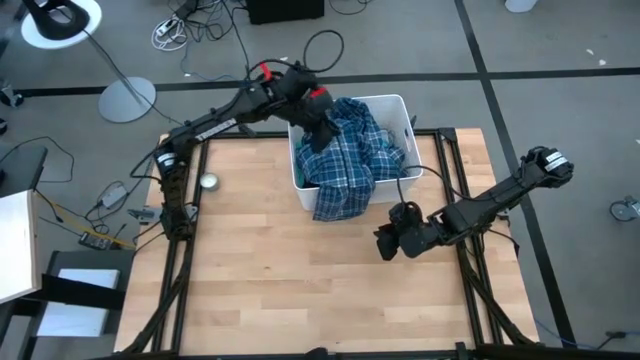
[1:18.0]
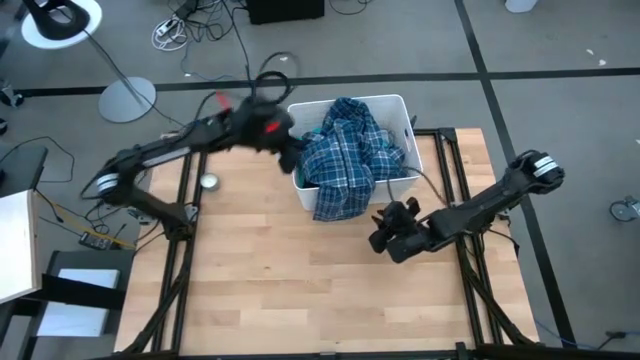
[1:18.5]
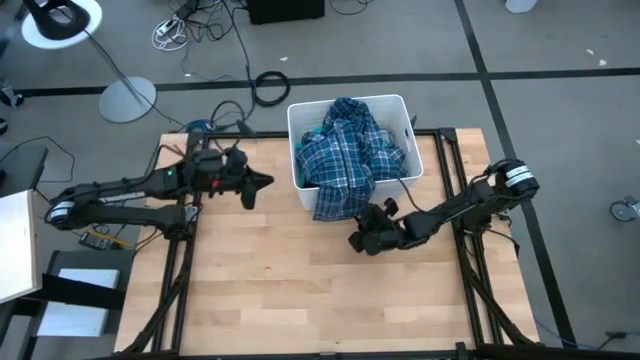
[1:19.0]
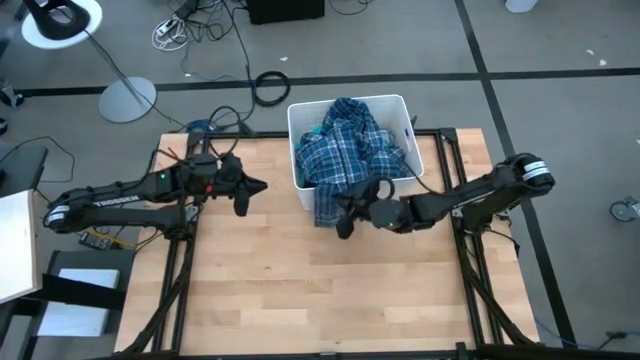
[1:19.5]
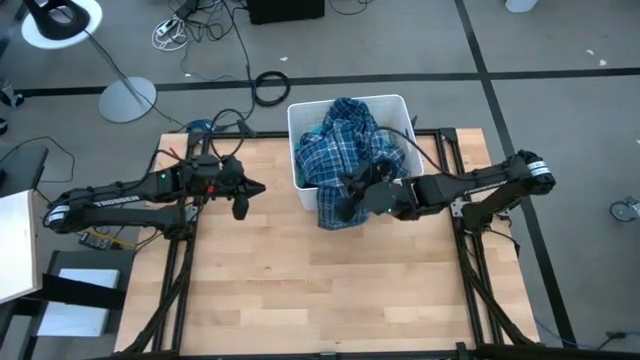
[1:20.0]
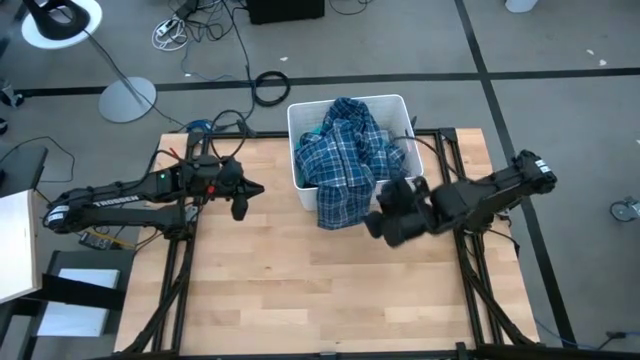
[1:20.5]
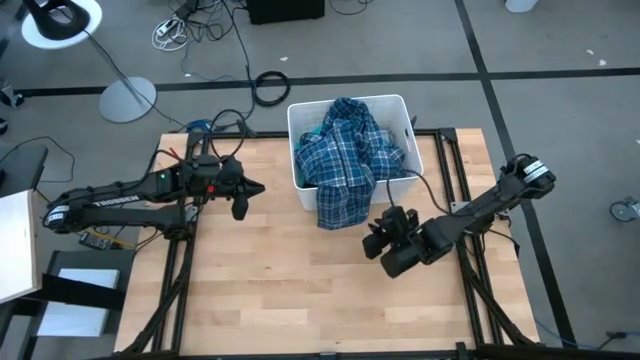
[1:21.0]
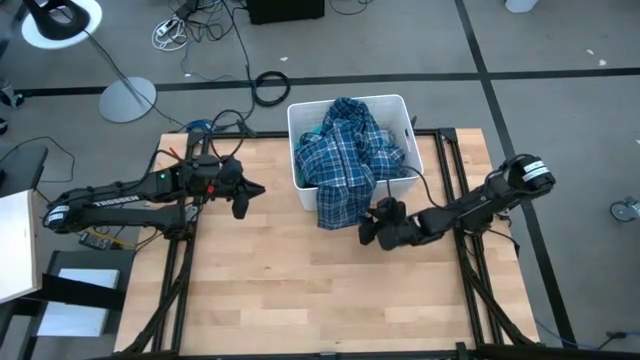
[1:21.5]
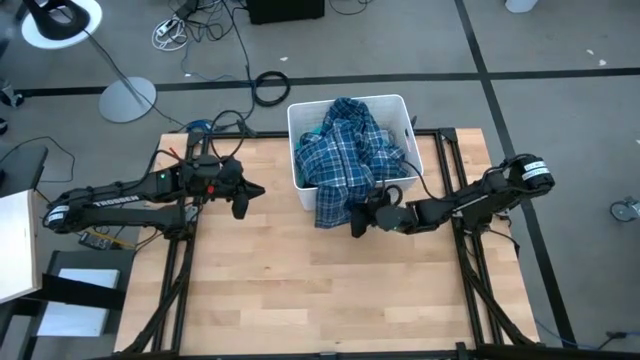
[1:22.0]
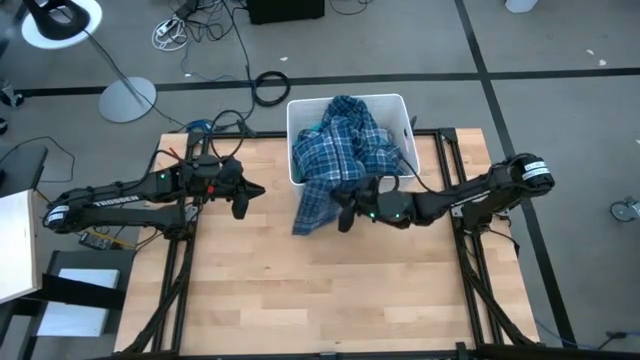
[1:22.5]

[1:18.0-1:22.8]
Task: Sort clothes
Put the dark blue long sleeve into the white bin

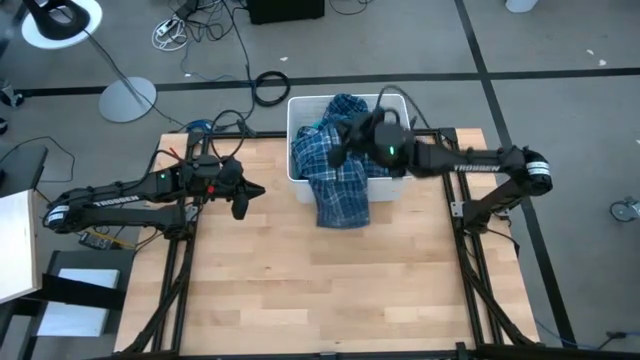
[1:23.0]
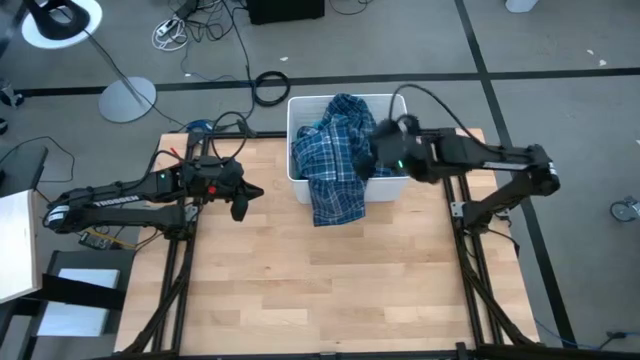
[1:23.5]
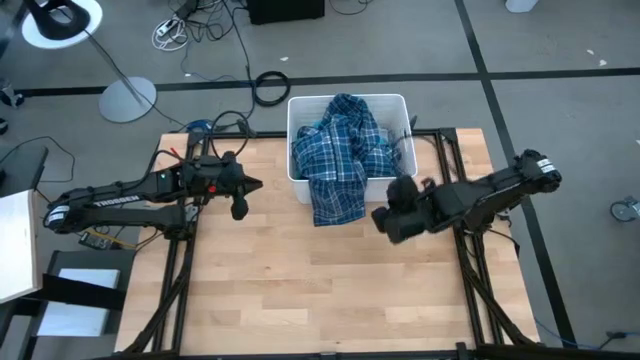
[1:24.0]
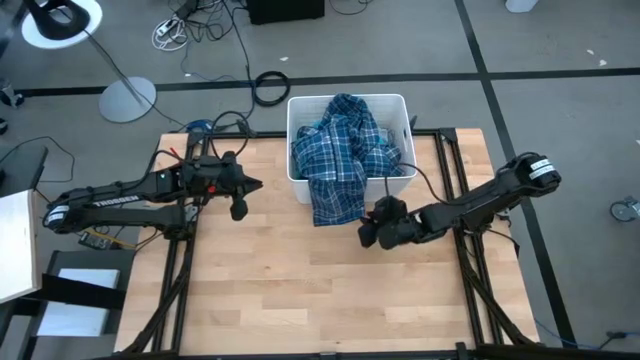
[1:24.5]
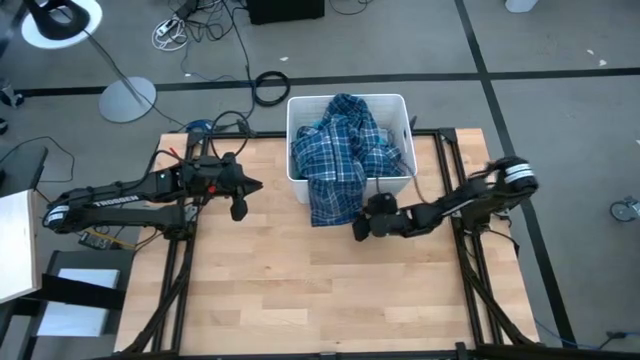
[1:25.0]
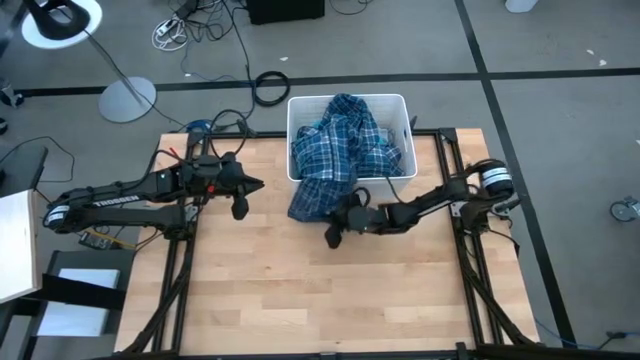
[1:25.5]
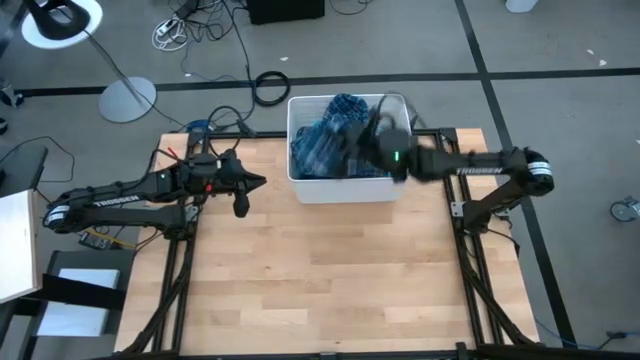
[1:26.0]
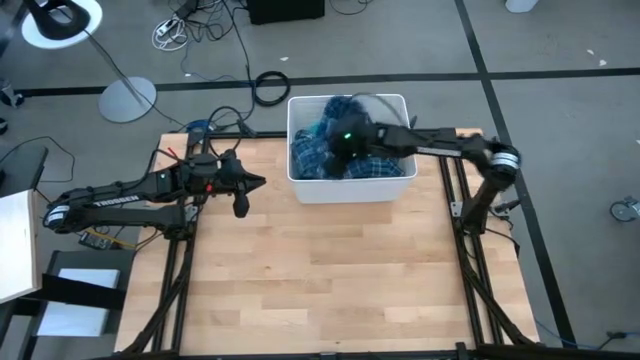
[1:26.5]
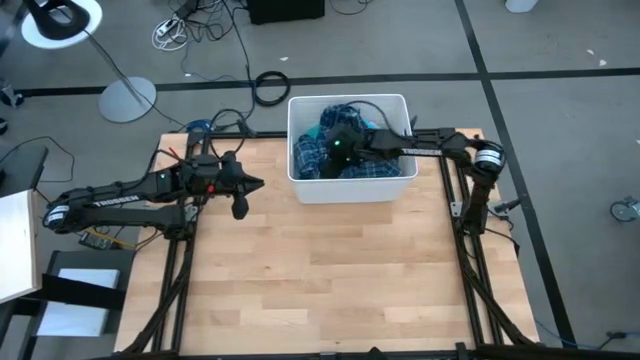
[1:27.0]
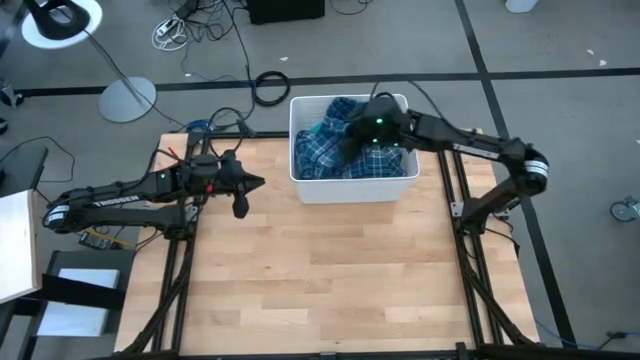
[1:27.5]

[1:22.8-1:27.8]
Put the dark blue long sleeve into the white bin

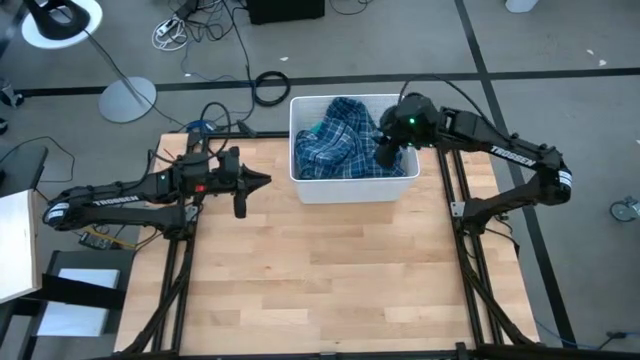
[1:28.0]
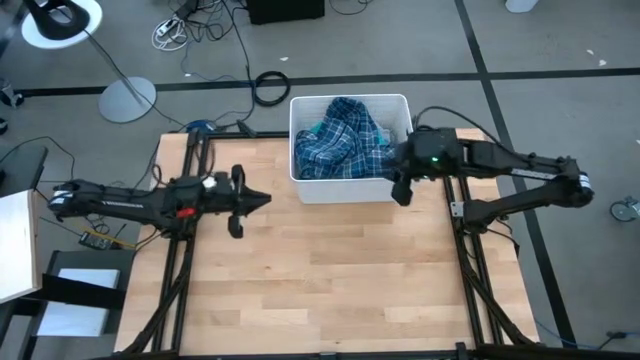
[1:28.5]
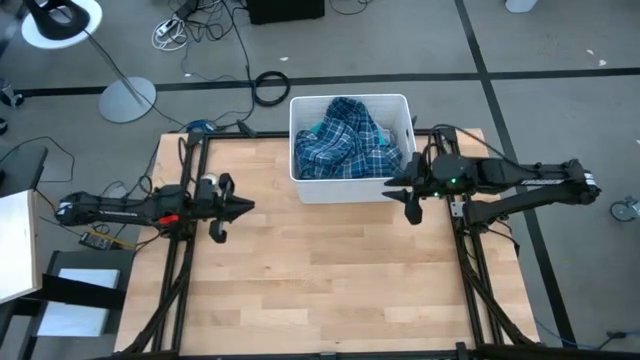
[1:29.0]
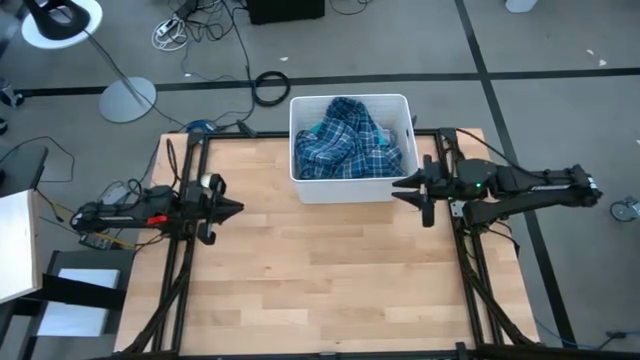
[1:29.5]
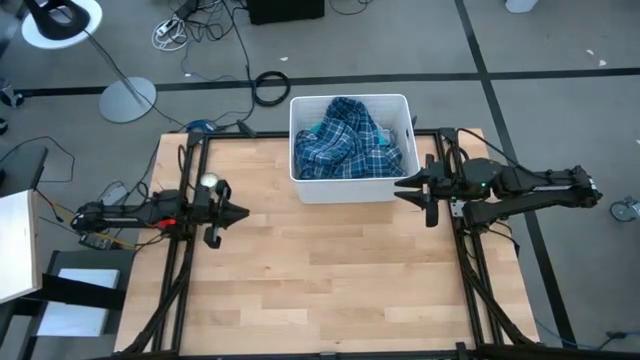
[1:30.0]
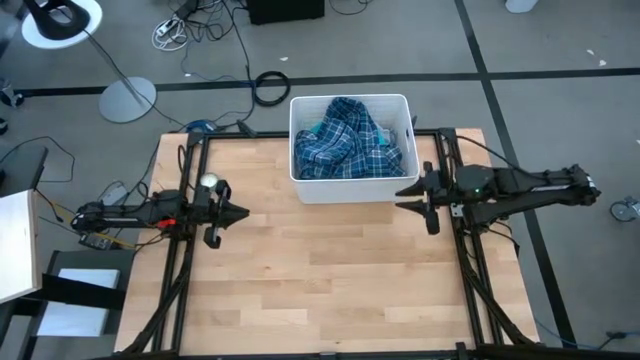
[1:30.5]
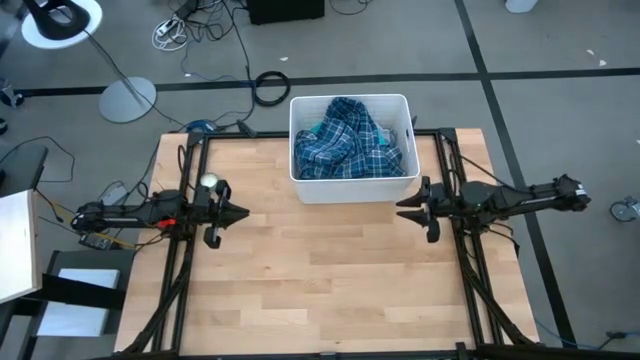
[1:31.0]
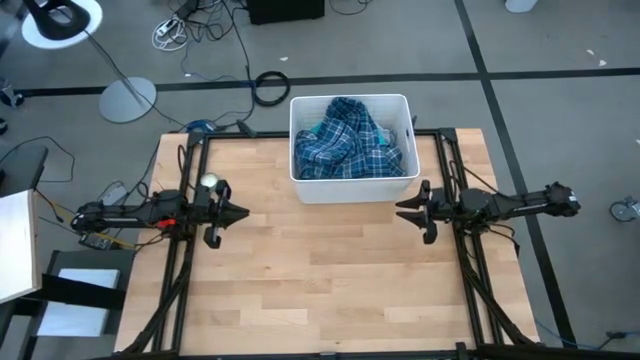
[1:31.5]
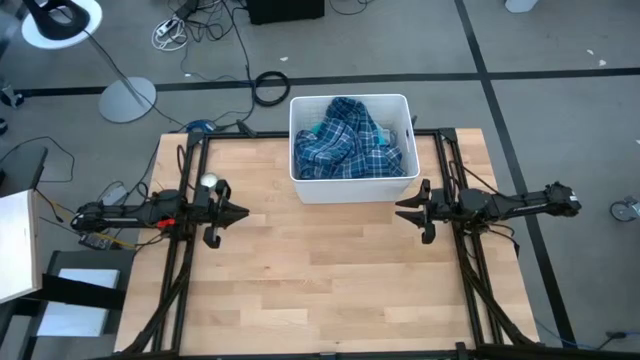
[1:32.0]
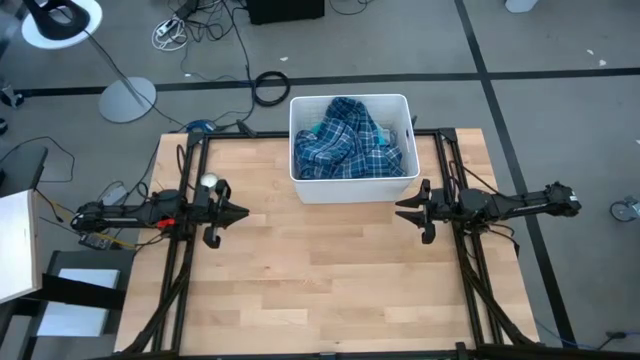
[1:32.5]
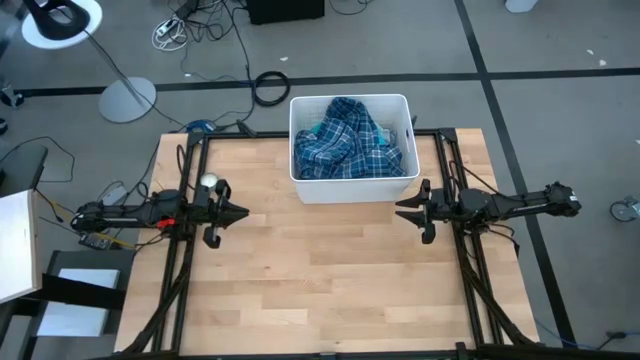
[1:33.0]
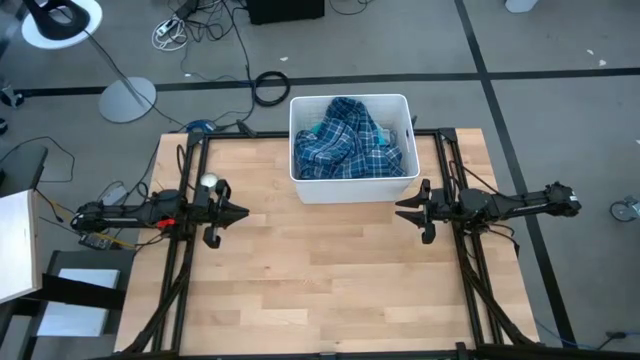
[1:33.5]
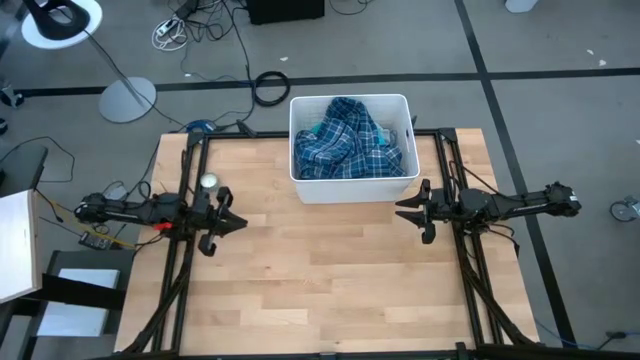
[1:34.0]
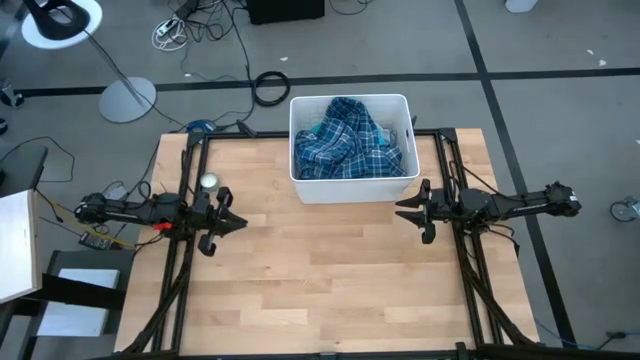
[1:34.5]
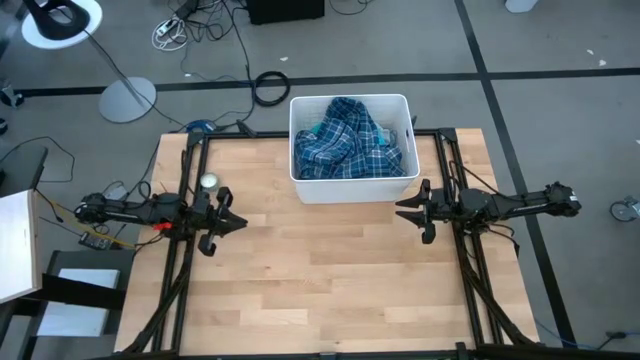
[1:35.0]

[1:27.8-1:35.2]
Return to Home Position

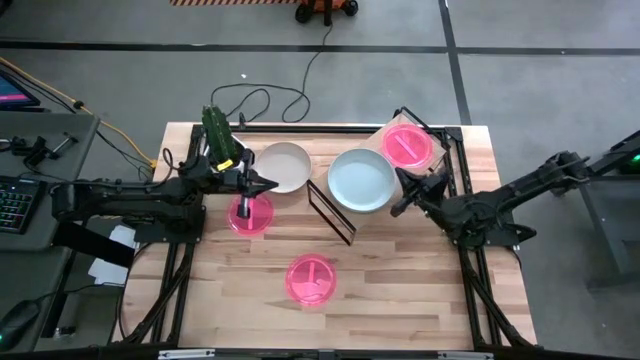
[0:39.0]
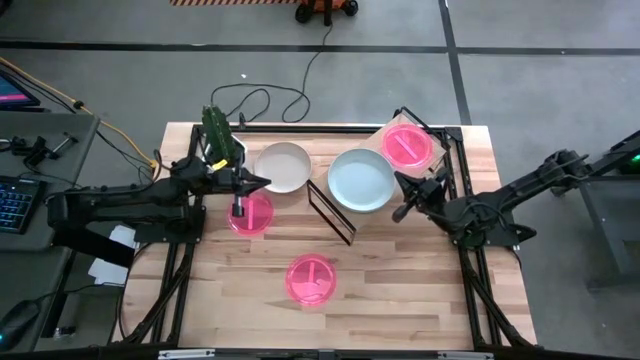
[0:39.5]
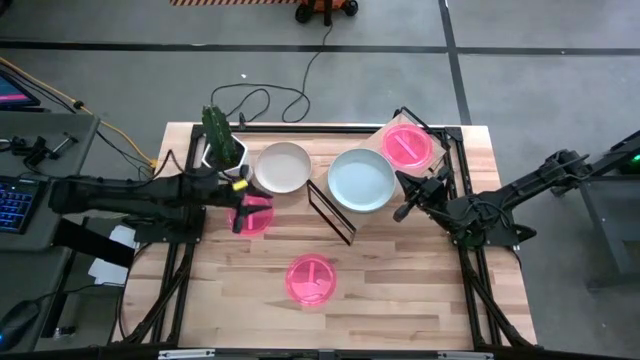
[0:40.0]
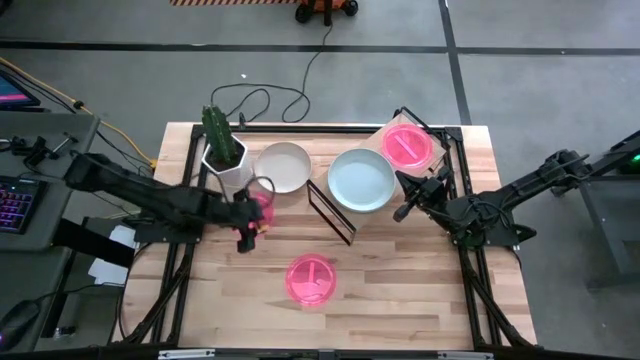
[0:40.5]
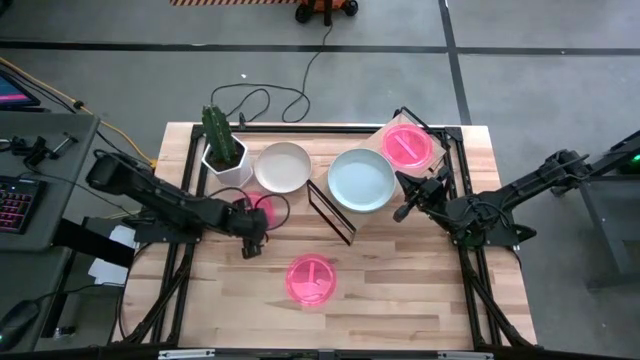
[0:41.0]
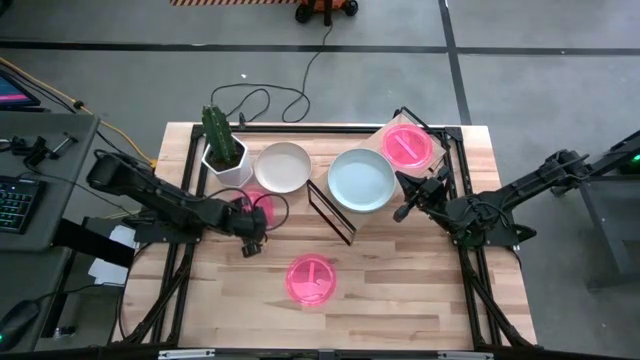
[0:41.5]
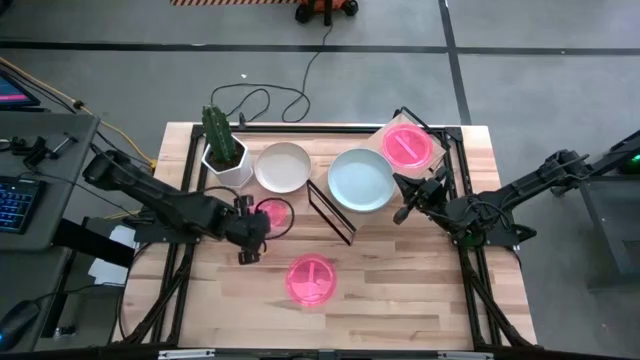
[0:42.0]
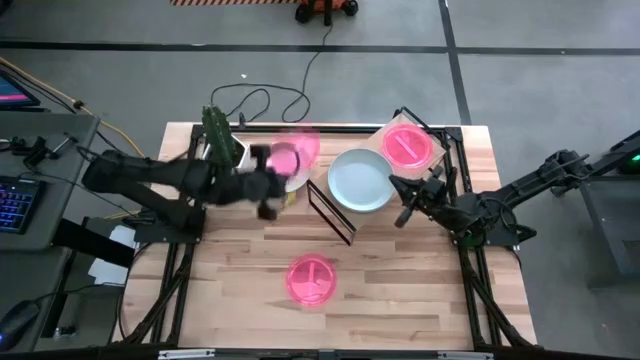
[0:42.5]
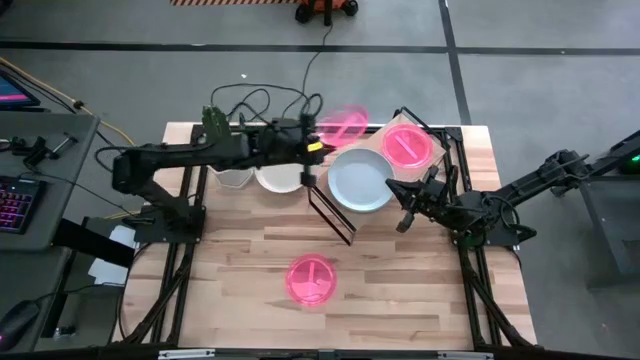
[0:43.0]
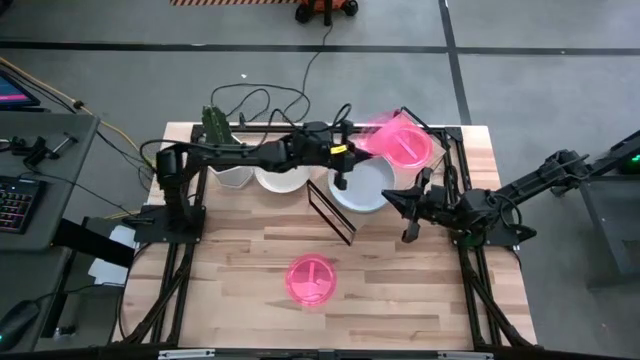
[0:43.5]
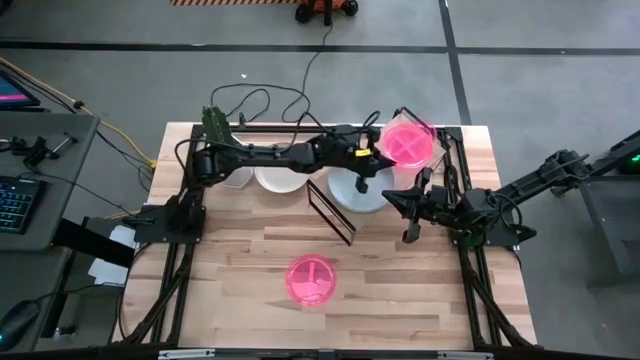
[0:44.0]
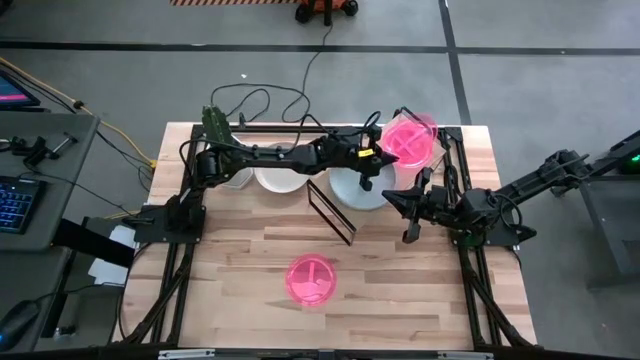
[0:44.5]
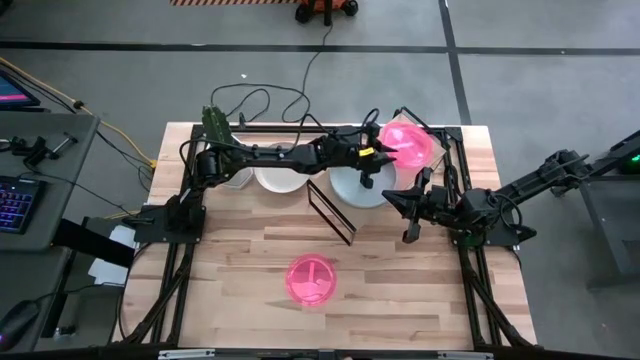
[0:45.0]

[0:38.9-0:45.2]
Task: Place and stack plates onto a shelf
Stack the left pink plate on top of the pink plate on the shelf
